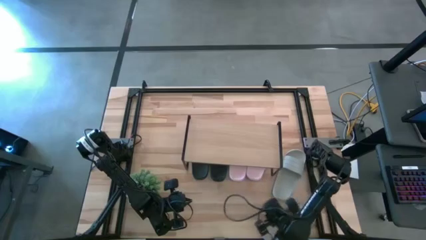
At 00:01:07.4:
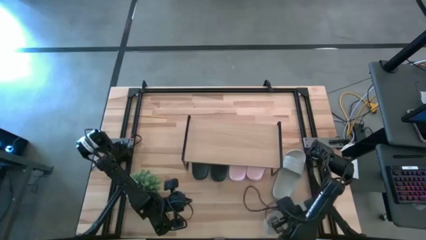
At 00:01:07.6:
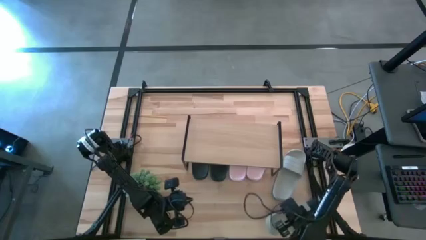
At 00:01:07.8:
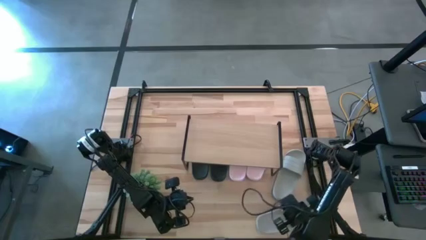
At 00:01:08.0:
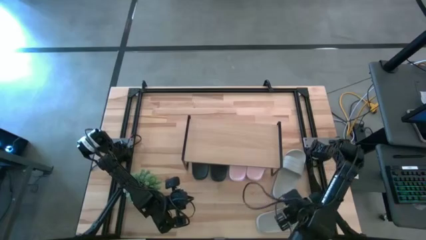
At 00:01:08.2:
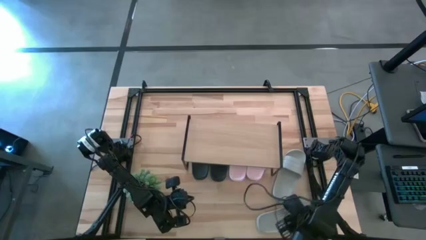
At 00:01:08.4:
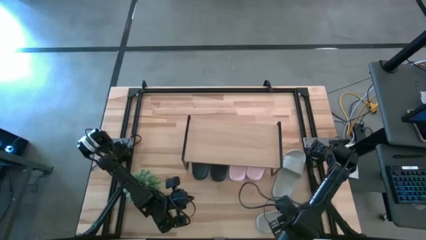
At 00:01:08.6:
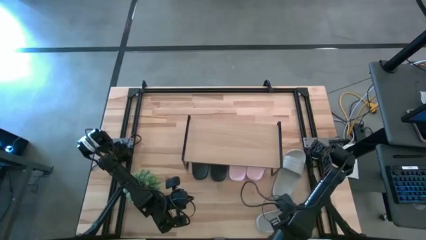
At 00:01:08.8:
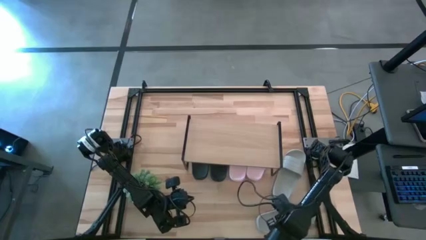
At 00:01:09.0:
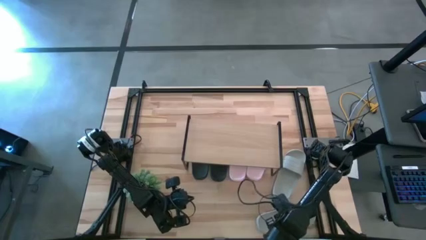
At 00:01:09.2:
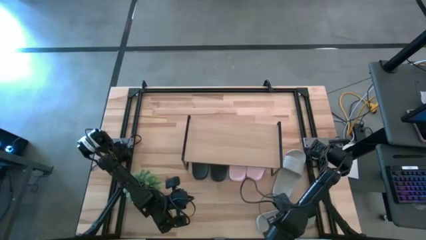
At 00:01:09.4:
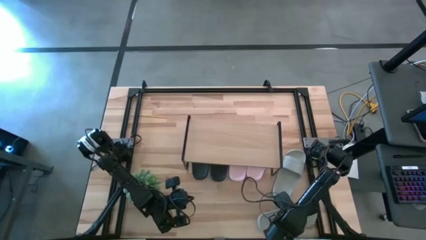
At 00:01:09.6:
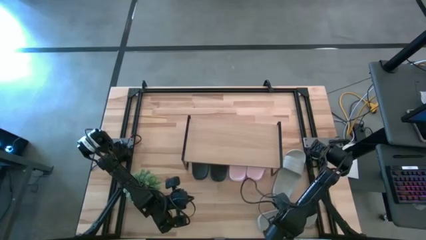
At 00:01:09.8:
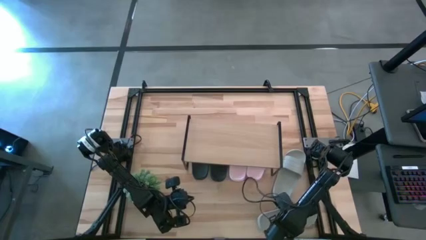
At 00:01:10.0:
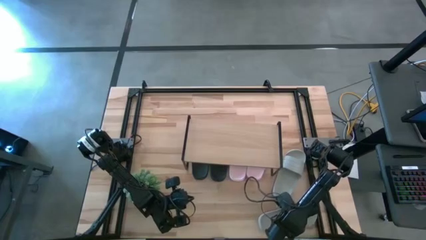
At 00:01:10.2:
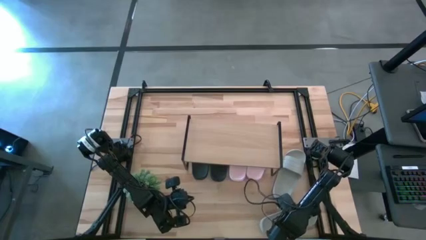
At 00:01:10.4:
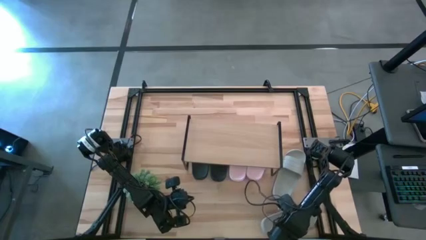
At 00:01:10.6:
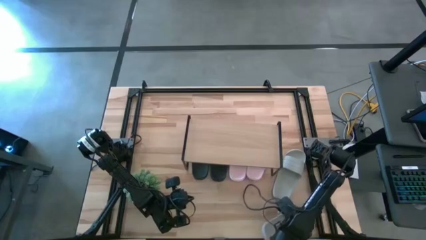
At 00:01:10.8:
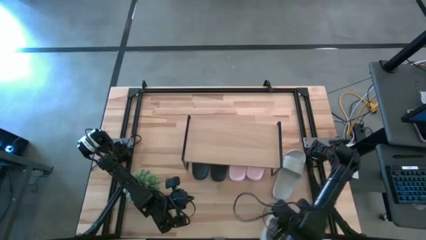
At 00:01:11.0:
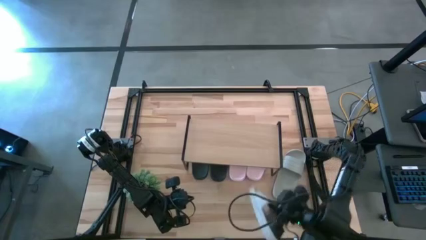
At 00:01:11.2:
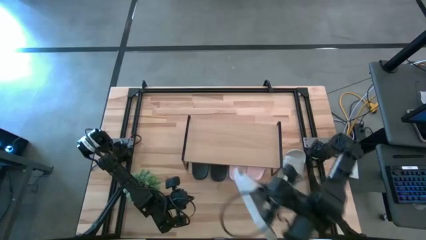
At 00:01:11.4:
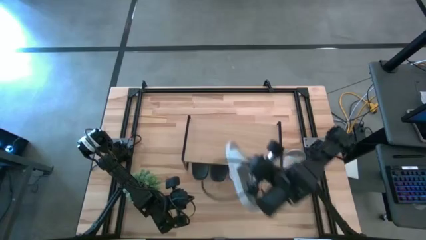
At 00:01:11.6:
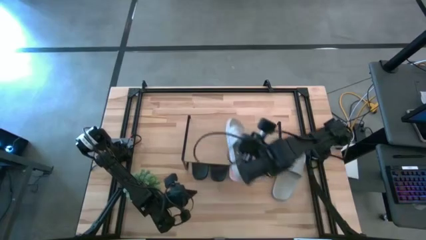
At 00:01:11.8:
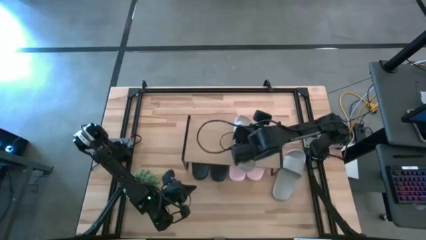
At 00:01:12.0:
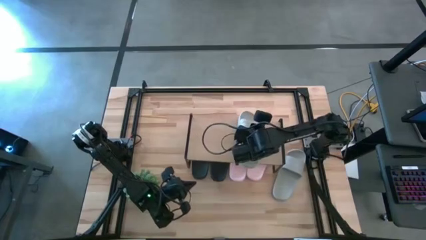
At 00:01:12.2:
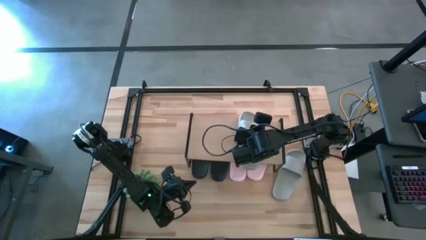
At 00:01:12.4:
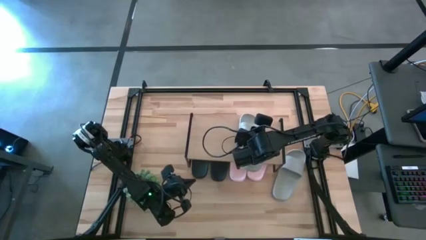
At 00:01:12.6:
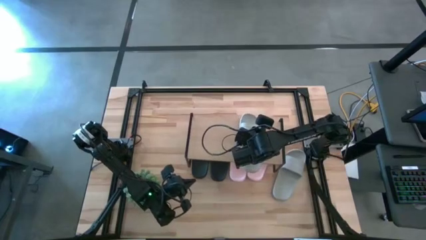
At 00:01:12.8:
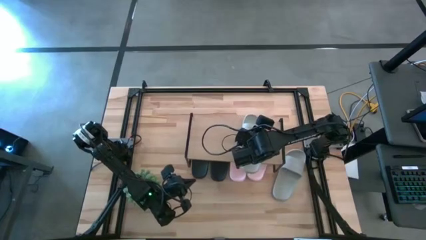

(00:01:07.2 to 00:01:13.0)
Task: Pick and place slides into the shelf
Put the bottom gray slide on the shelf

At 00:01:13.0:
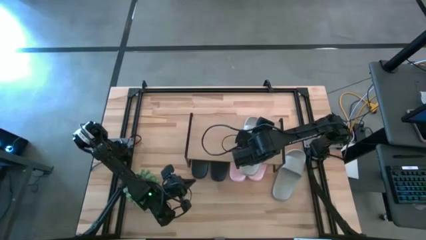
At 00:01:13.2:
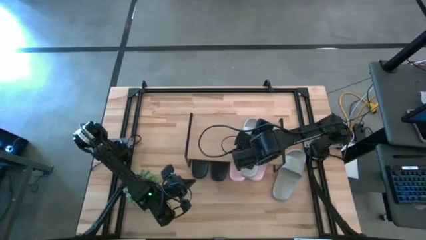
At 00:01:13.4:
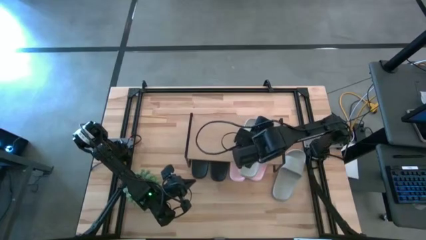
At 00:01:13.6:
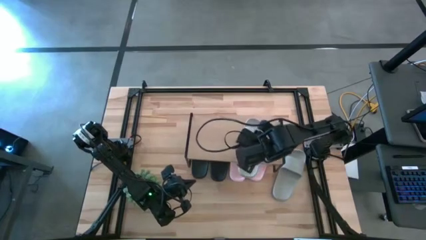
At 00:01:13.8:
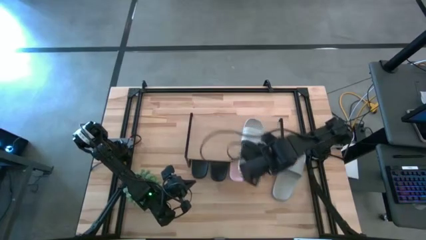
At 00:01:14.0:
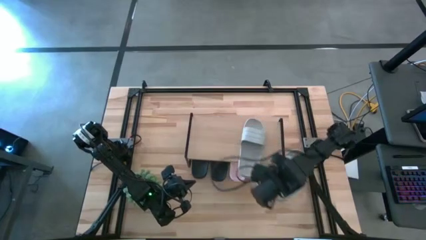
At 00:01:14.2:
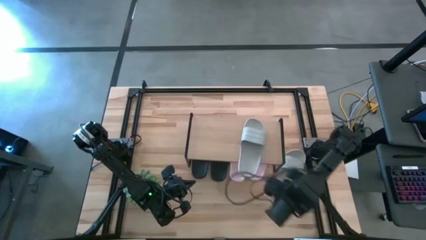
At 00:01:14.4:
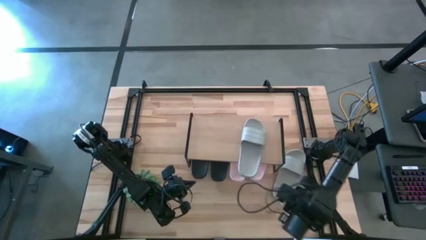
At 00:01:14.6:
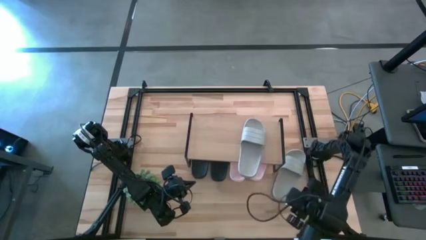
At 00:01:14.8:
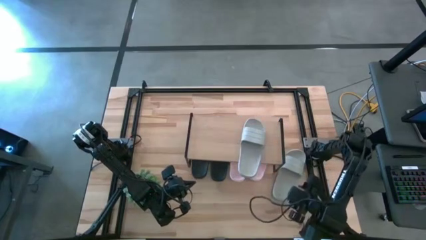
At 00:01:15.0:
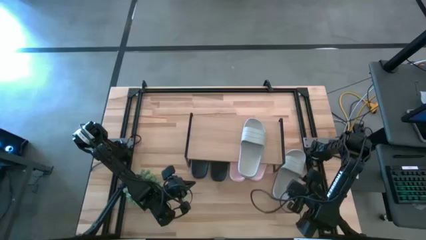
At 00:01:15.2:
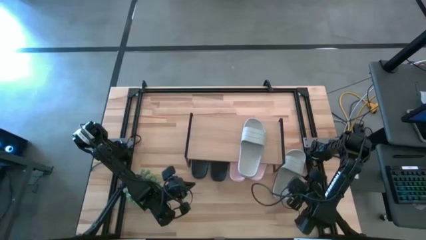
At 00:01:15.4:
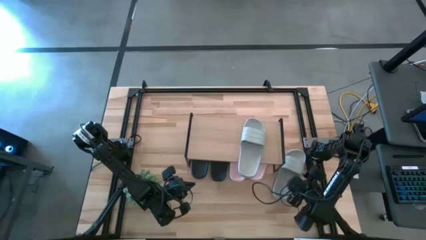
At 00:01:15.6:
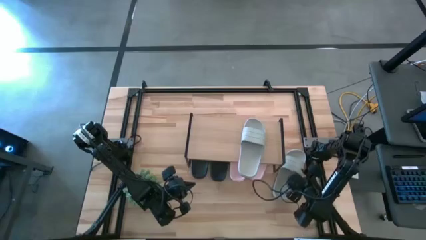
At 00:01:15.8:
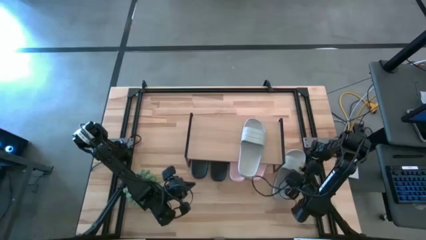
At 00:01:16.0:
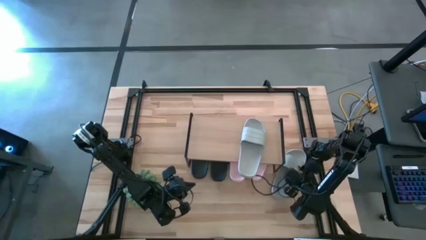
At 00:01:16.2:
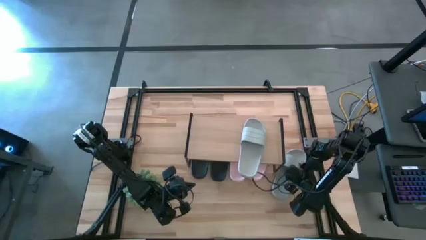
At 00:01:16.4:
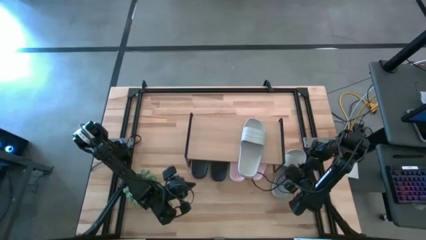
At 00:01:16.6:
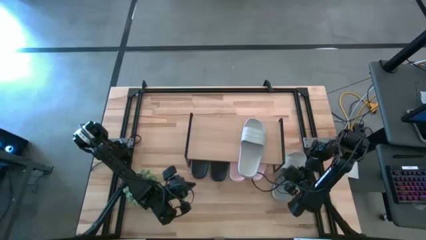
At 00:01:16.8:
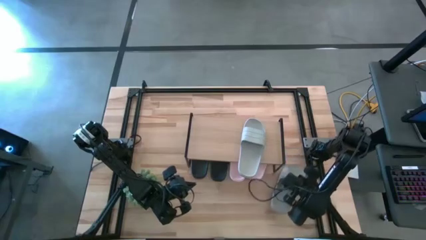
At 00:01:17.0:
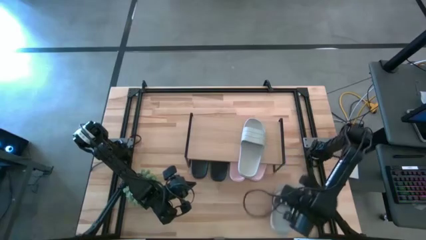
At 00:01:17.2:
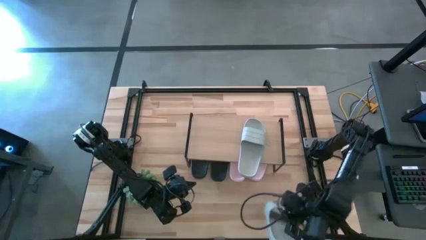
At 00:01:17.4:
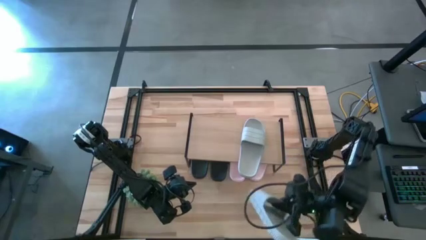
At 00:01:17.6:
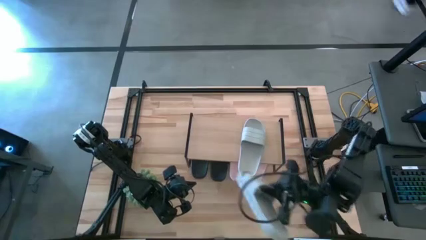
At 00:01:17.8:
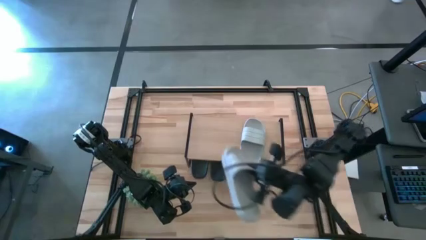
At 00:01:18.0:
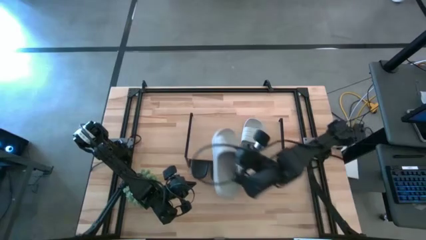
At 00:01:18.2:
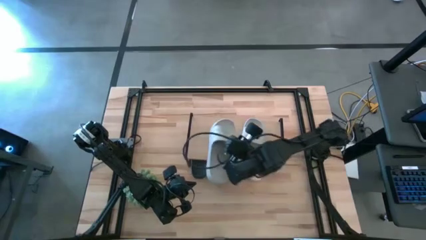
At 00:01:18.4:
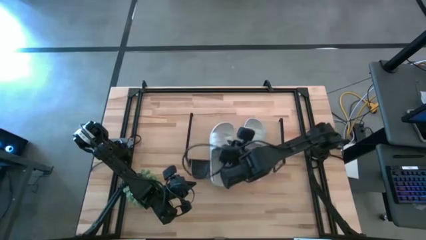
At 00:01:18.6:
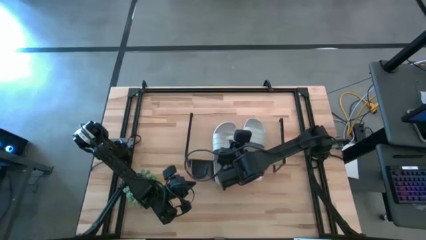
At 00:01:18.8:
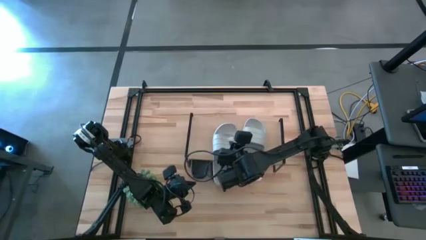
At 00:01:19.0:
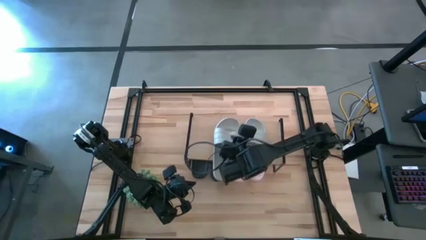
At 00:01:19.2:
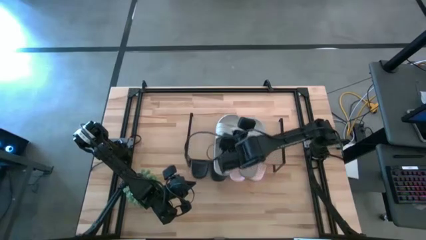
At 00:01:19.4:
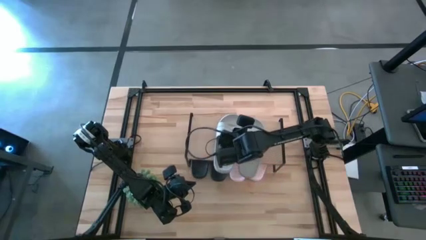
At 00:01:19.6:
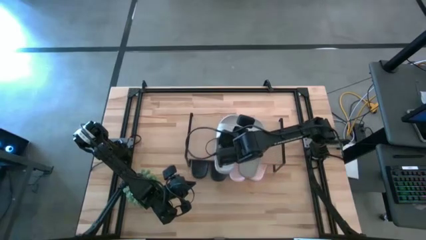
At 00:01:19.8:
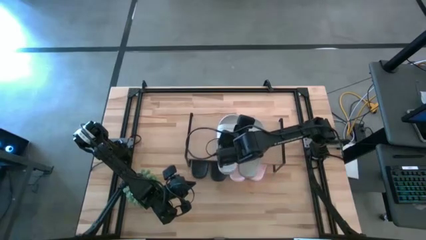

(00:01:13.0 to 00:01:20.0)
Put the gray slide on the shelf

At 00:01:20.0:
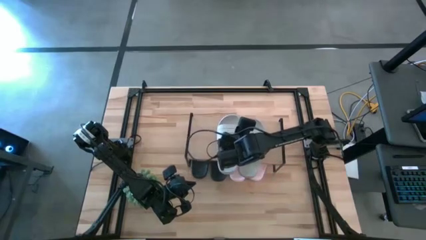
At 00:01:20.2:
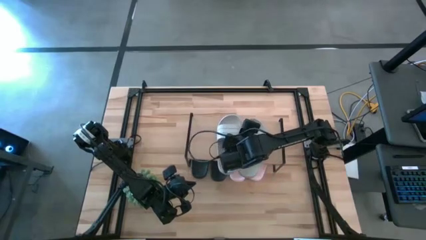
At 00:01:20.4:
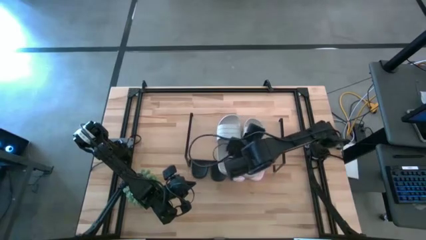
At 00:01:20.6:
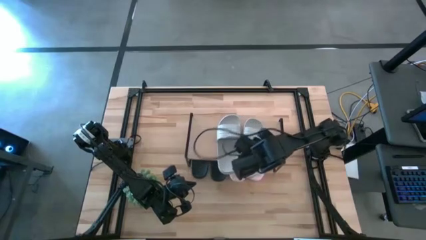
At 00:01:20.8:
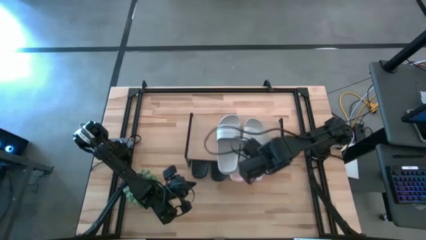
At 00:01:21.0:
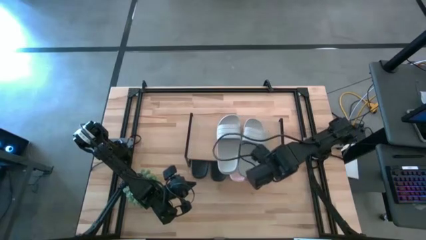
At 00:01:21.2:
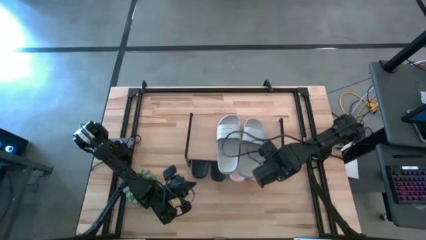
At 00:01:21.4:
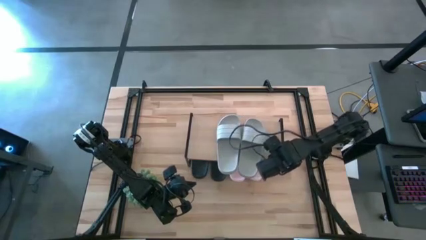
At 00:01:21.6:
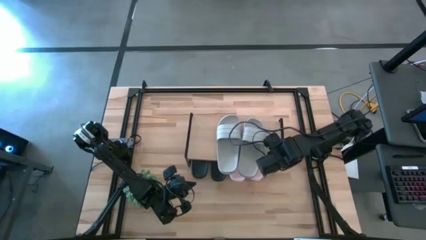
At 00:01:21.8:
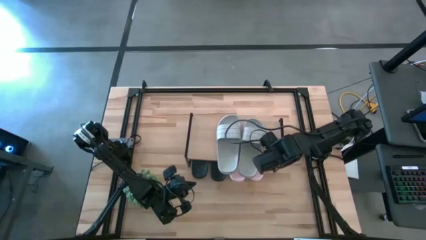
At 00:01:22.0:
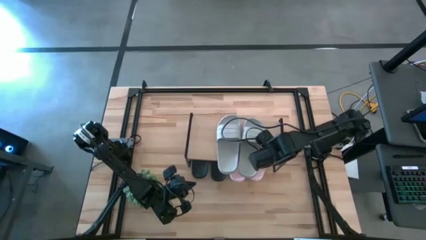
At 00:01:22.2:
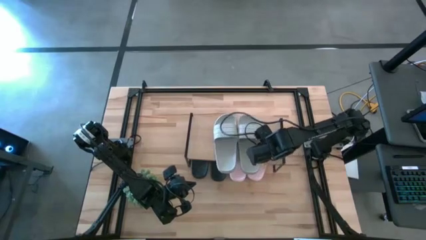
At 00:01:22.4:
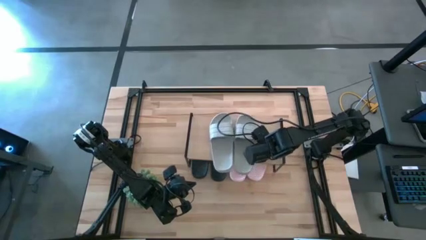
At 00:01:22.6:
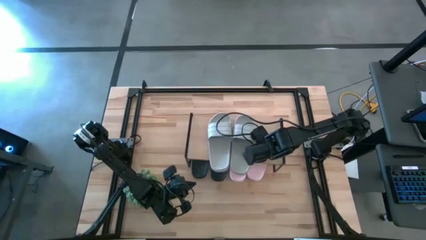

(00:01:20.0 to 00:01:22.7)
Adjust gray slides
